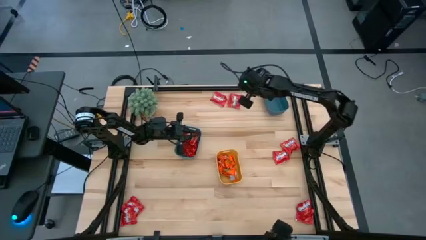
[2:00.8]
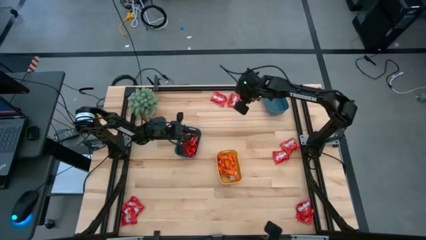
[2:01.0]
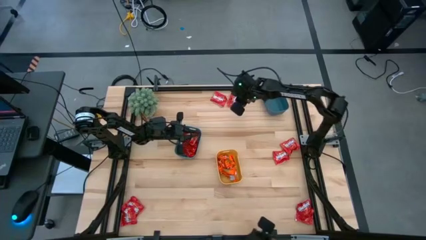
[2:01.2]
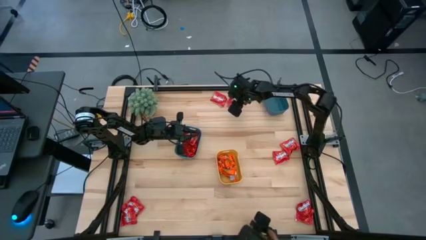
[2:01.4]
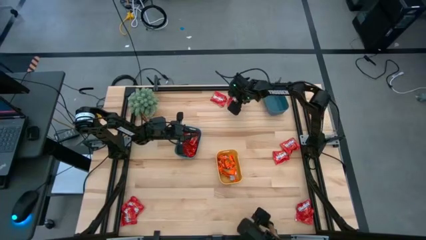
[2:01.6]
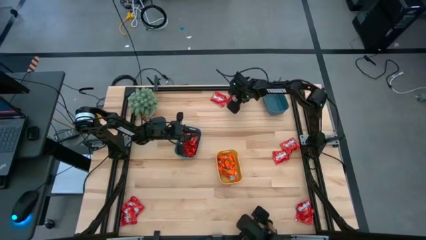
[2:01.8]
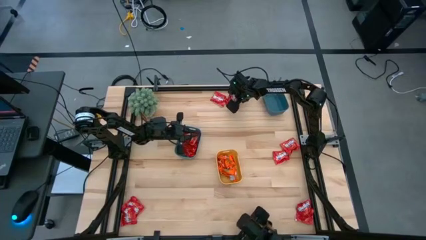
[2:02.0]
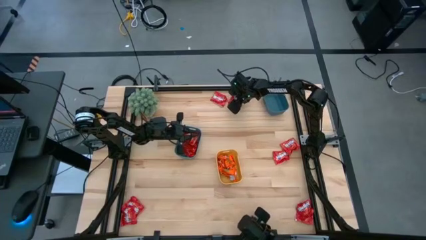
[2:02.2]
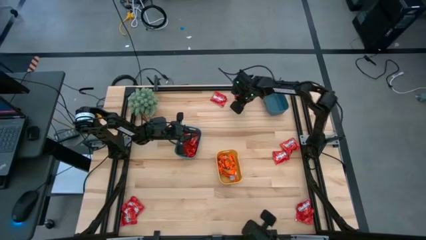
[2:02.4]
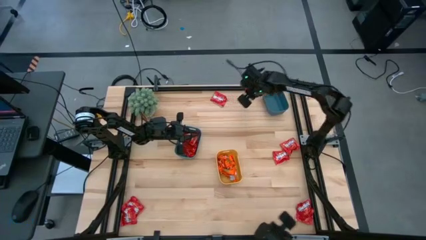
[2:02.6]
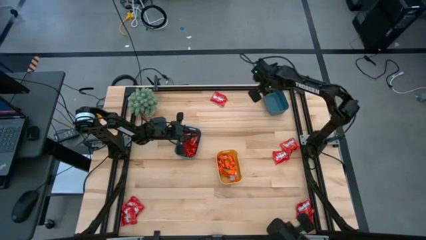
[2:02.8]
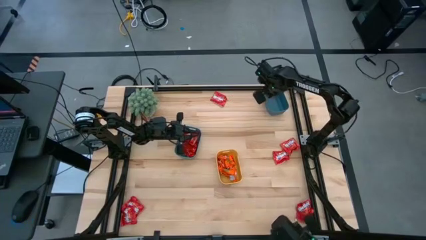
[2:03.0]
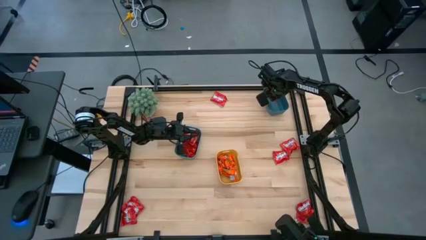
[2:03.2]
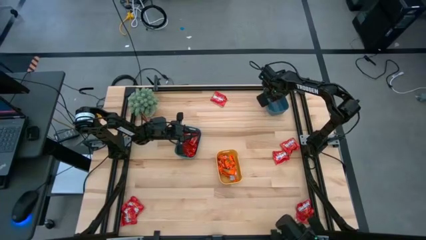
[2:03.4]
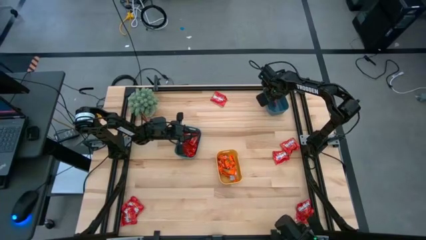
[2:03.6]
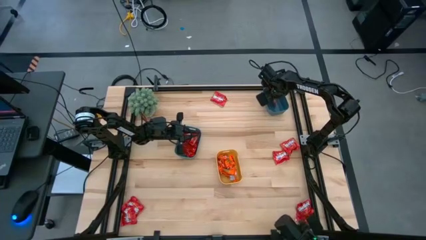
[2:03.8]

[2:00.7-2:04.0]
Task: Sort candy
Put the red candy into the blue bin

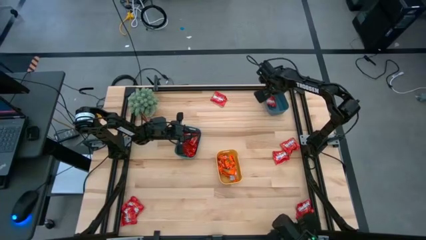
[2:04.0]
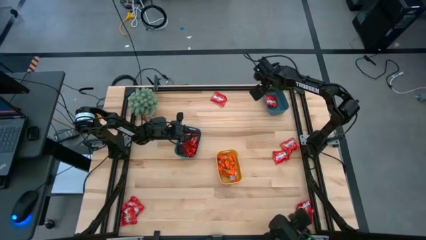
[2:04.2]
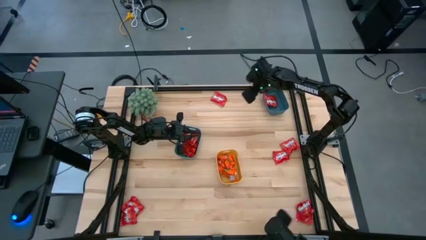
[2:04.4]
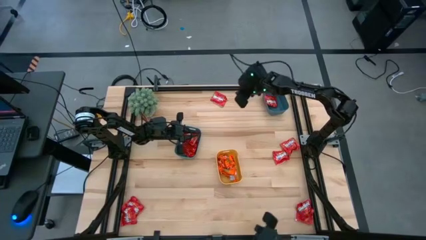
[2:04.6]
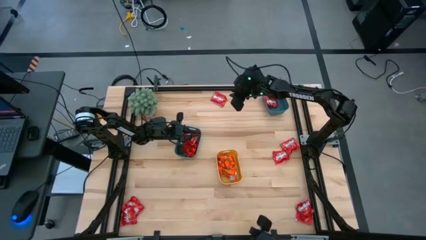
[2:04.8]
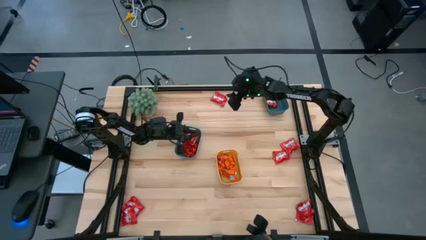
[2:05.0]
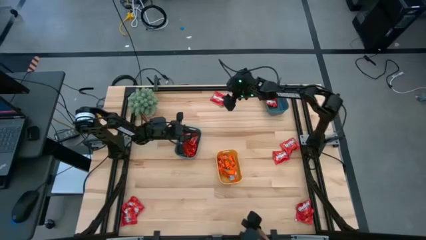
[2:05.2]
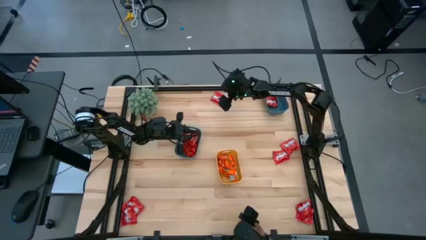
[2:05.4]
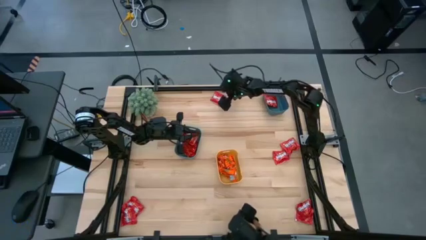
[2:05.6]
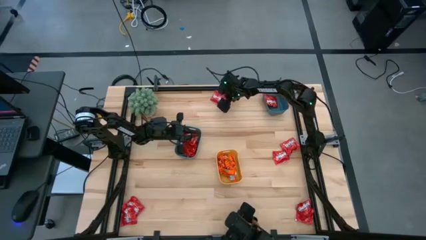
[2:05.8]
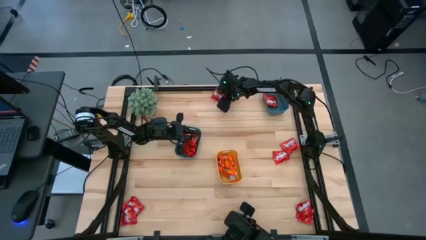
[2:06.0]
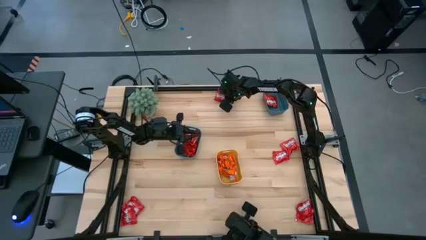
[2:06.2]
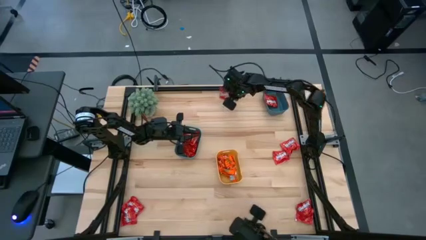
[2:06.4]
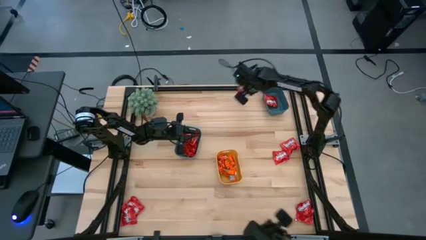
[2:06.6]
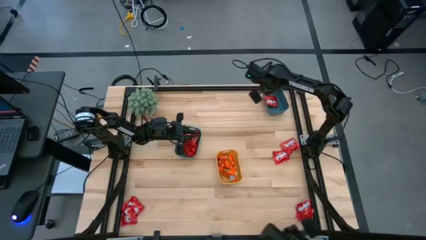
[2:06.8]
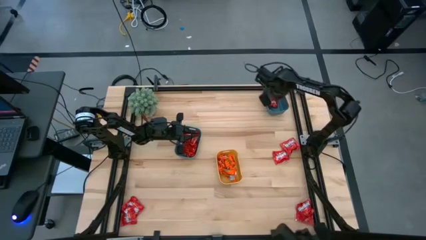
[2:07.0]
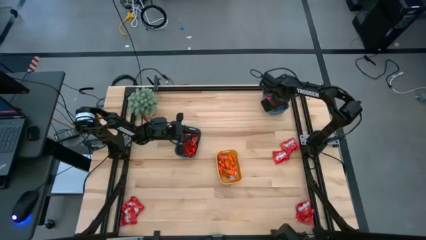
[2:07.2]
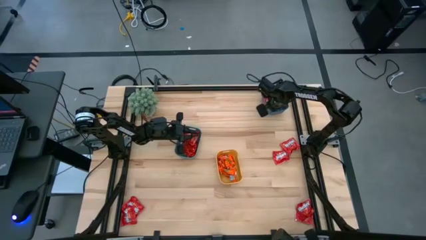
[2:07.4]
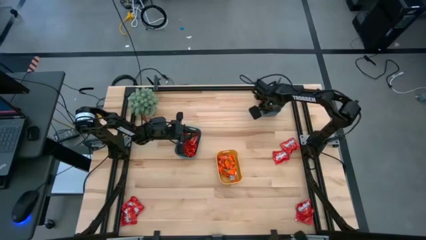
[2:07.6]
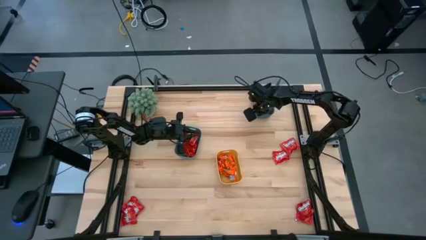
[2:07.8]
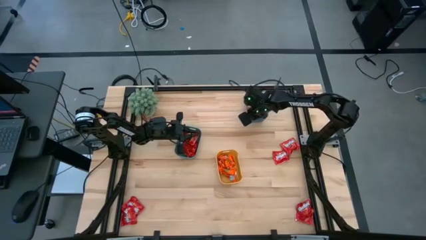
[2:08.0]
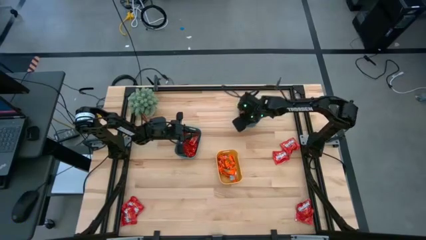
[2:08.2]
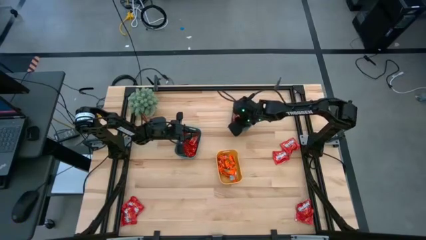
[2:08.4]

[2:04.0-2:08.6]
Put the red candy into the blue bin

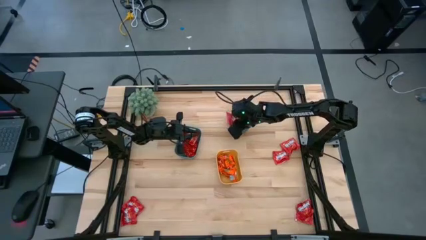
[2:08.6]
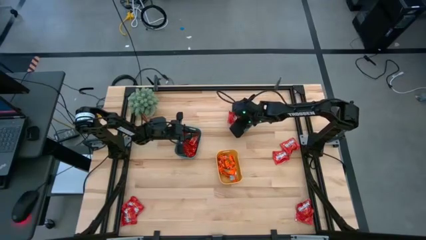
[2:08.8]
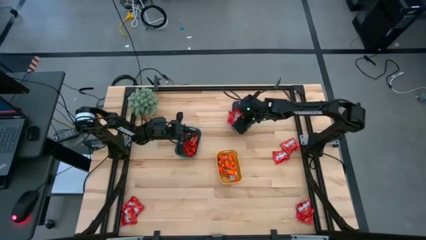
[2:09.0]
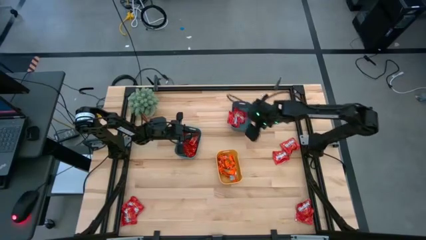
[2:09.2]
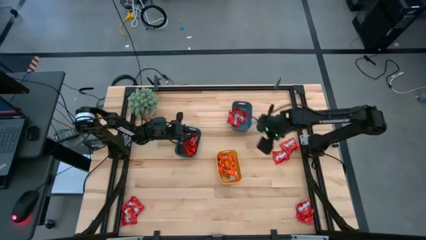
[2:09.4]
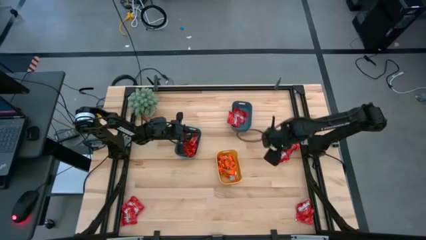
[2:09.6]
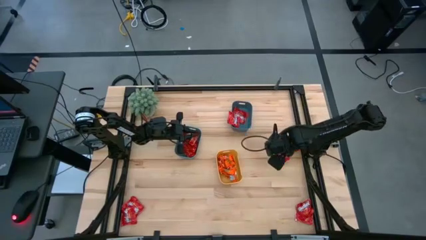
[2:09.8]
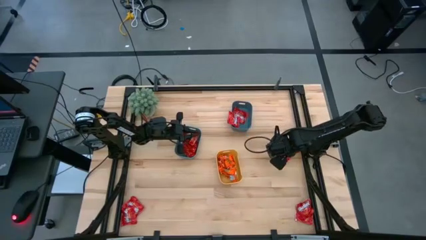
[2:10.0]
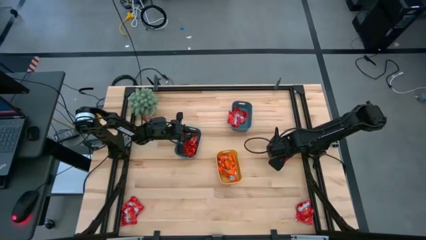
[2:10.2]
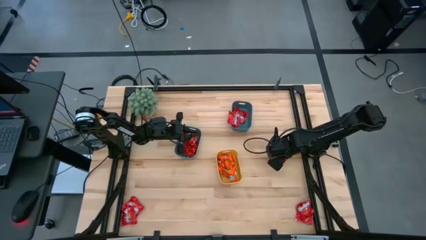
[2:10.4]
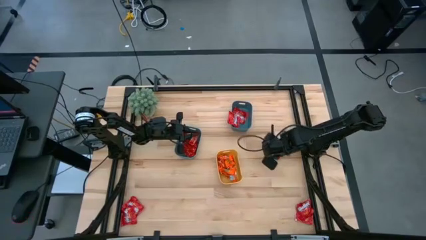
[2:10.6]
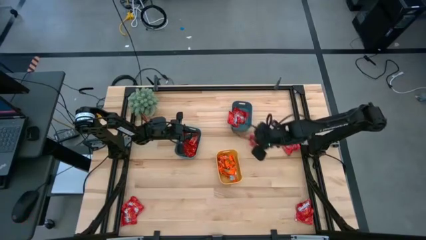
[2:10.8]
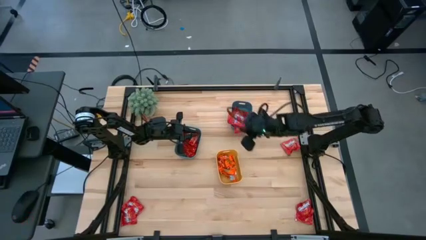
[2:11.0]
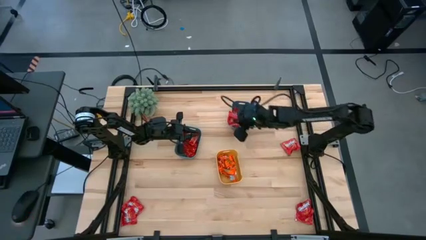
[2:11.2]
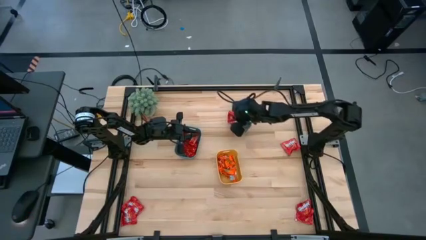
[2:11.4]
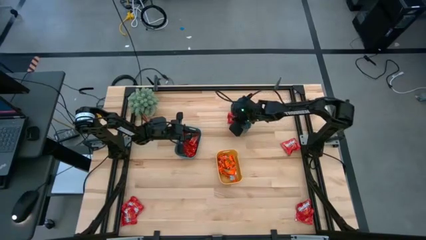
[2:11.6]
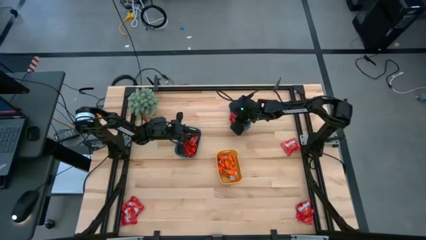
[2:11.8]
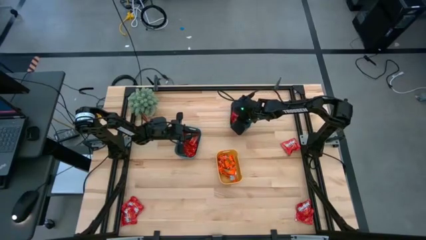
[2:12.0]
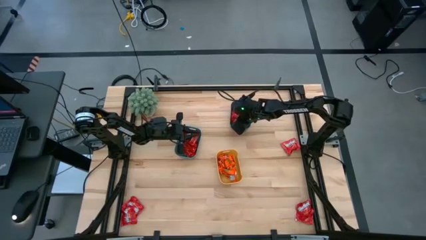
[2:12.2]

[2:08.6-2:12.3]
Put the red candy into the blue bin

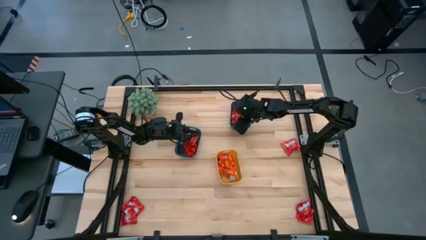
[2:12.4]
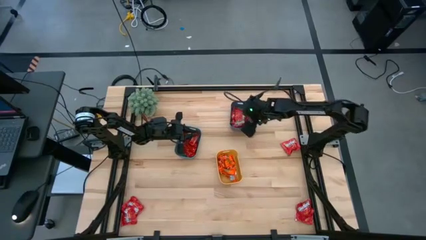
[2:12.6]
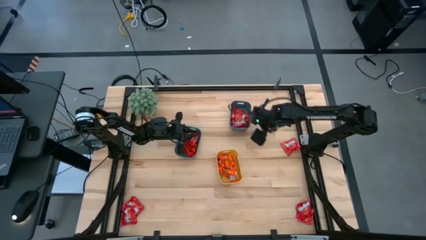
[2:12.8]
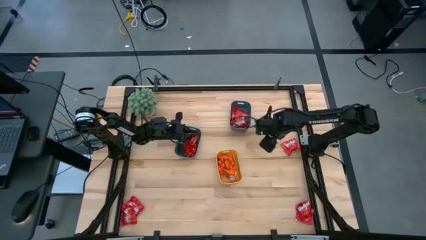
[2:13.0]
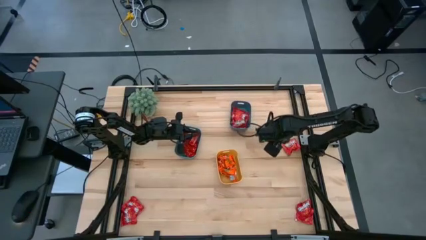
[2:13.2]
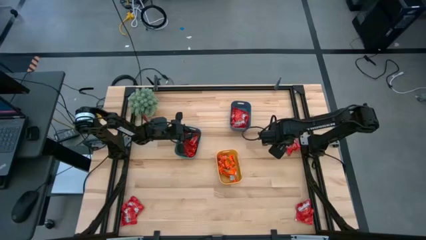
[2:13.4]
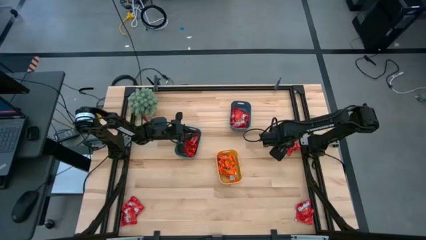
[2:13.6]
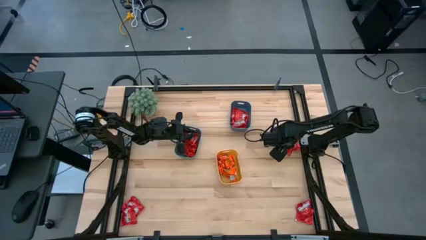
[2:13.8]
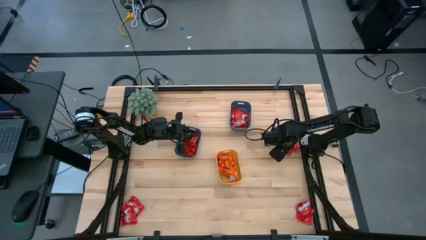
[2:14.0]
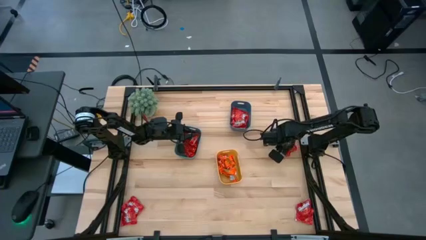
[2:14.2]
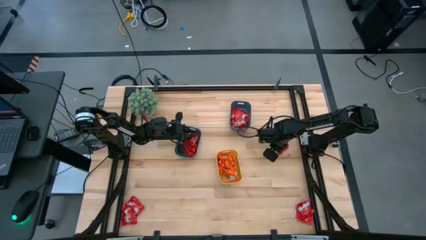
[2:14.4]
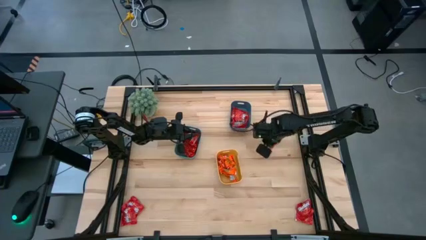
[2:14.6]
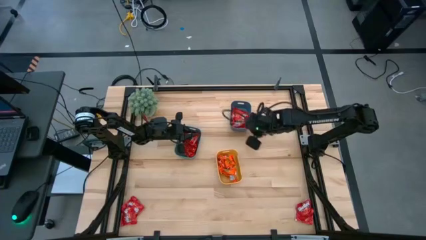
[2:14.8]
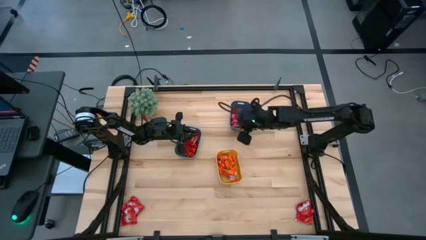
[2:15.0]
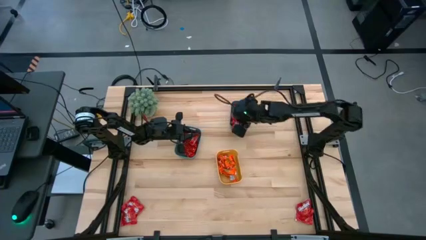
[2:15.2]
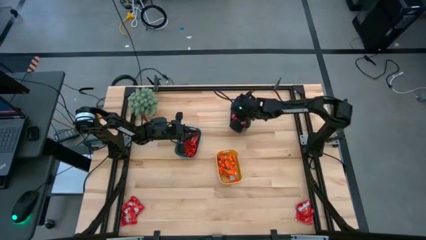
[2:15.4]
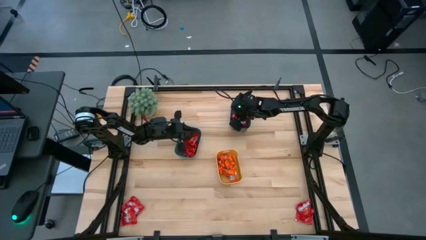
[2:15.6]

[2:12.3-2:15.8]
Put the red candy into the blue bin

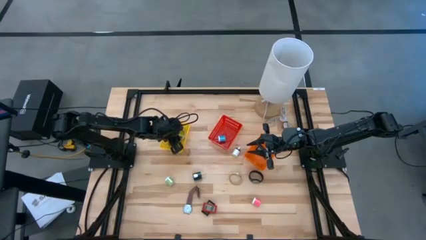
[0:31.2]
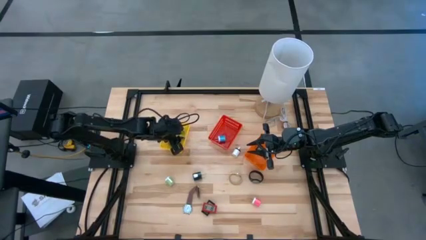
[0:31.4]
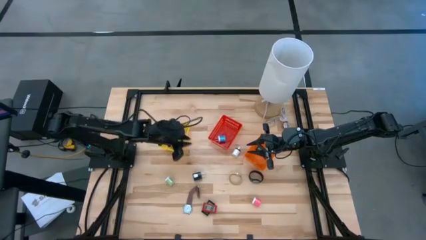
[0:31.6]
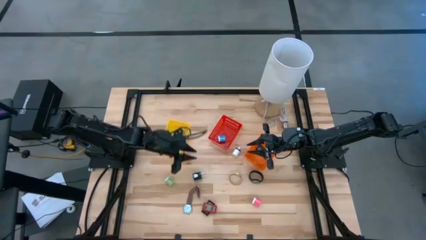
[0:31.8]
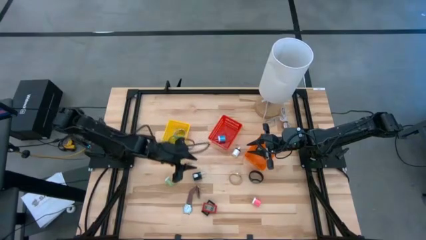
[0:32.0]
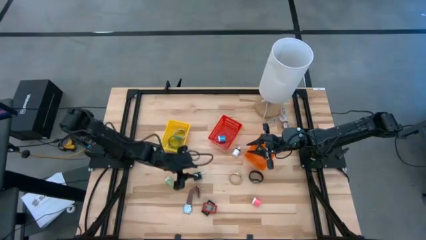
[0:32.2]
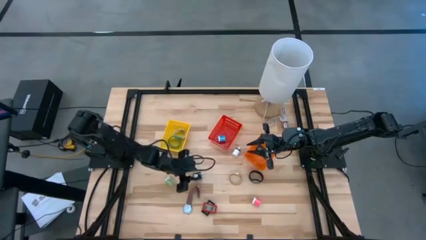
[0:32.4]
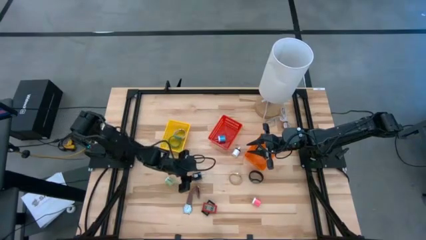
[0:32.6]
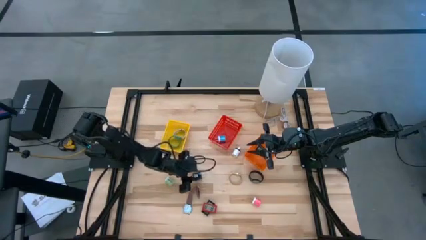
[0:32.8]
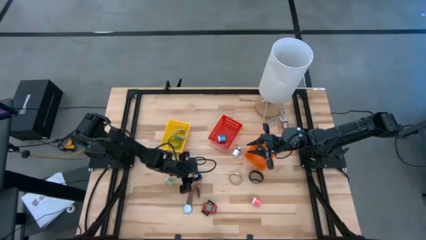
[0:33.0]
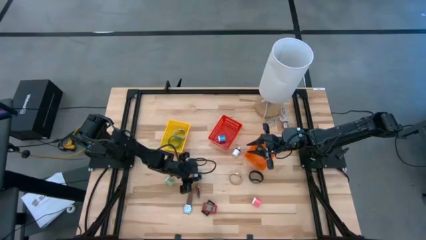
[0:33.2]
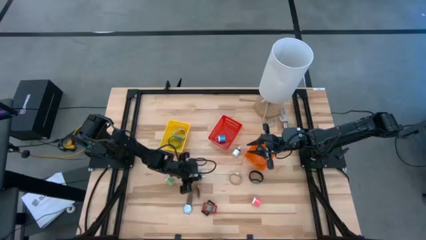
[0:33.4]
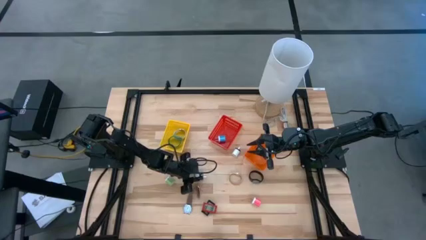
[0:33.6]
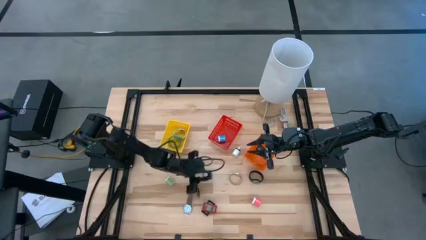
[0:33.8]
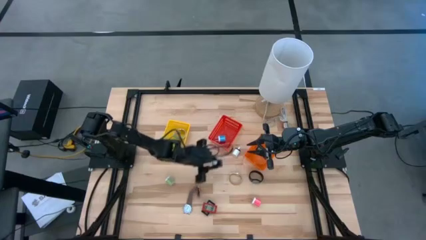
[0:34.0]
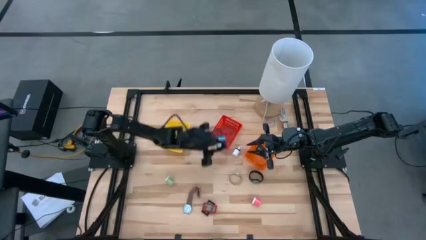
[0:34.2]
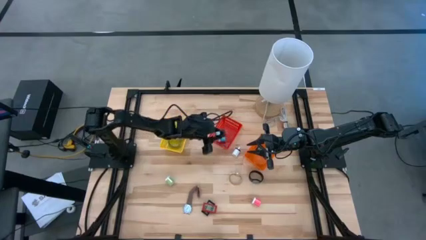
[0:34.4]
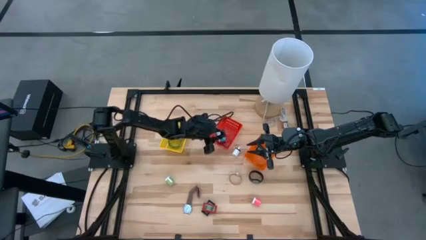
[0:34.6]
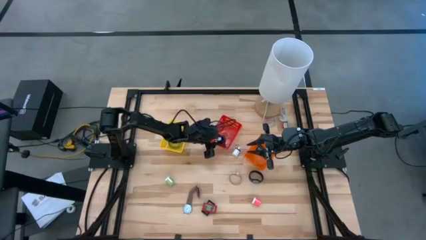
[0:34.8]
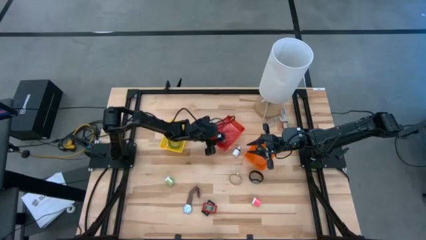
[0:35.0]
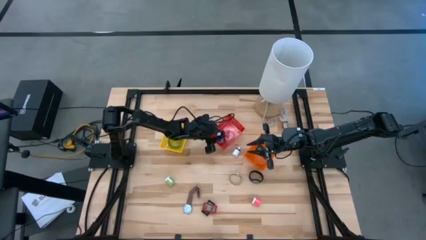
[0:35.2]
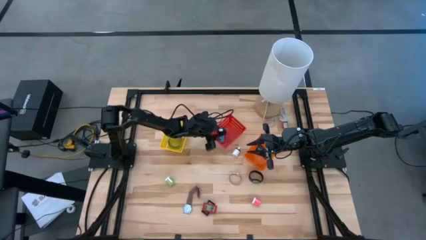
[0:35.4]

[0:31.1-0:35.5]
Task: Pick & Place Office items
Put the black charger adapter into the red bin
